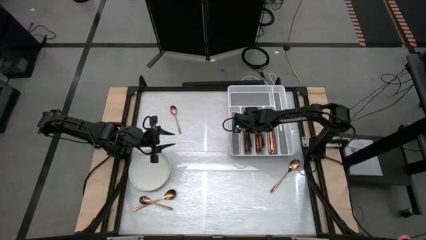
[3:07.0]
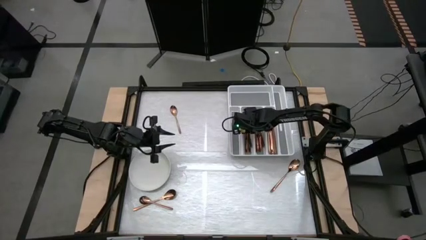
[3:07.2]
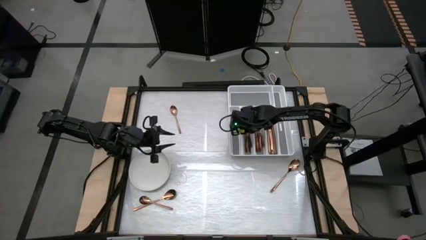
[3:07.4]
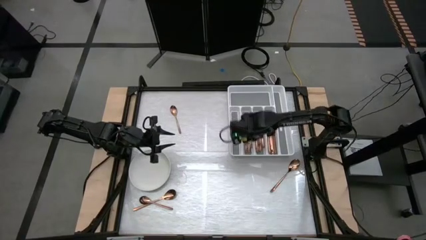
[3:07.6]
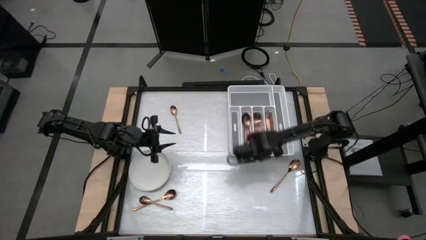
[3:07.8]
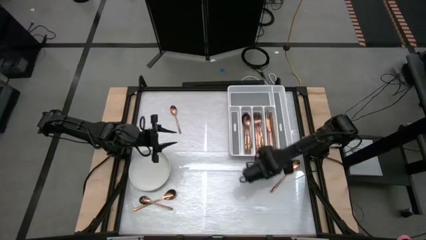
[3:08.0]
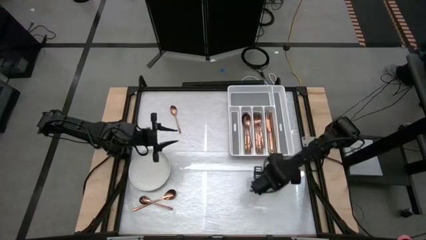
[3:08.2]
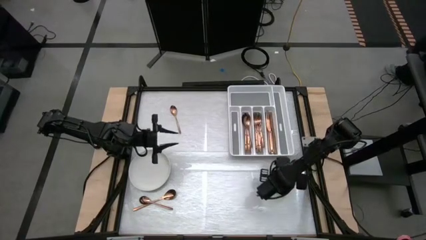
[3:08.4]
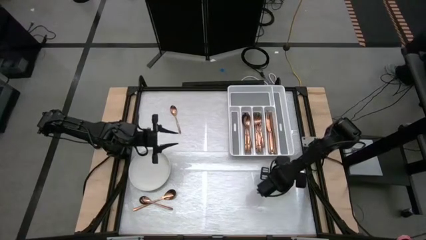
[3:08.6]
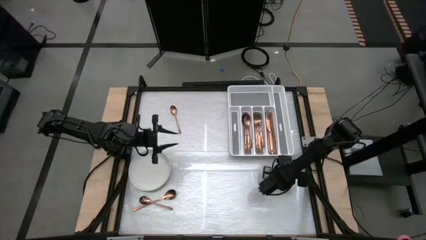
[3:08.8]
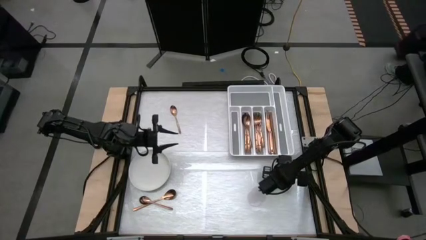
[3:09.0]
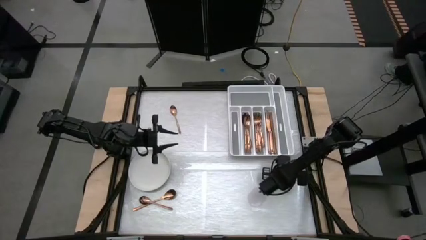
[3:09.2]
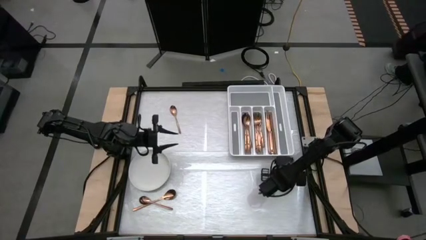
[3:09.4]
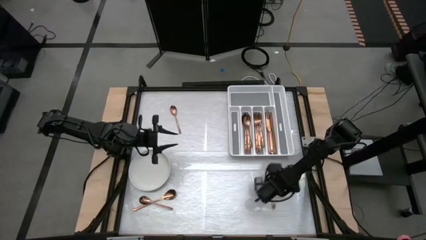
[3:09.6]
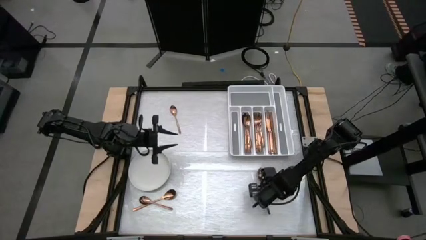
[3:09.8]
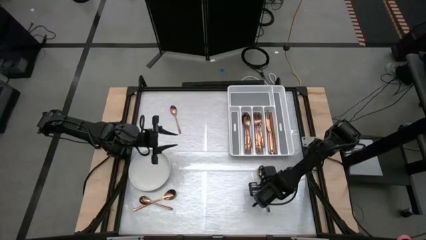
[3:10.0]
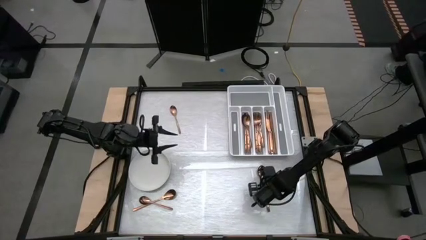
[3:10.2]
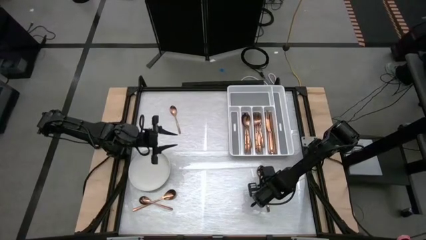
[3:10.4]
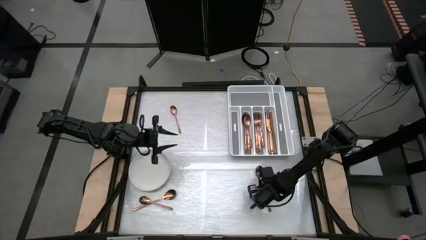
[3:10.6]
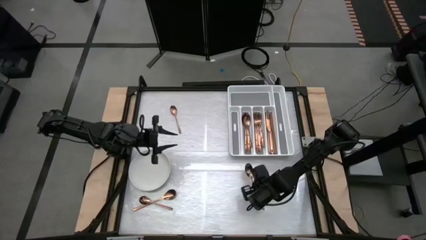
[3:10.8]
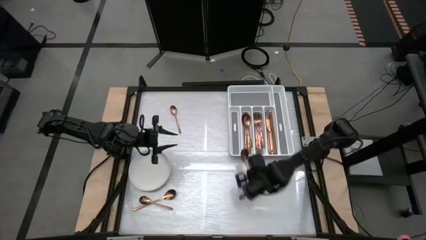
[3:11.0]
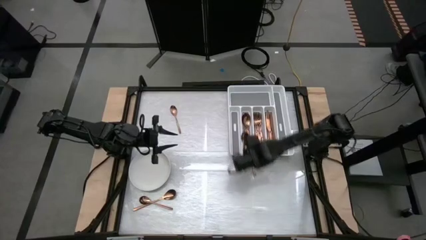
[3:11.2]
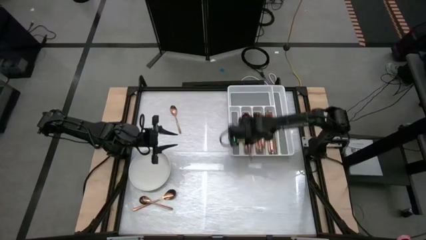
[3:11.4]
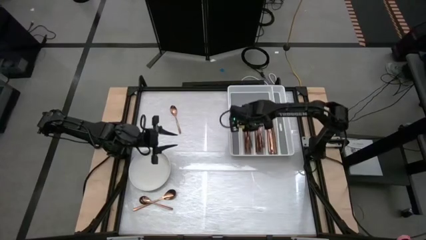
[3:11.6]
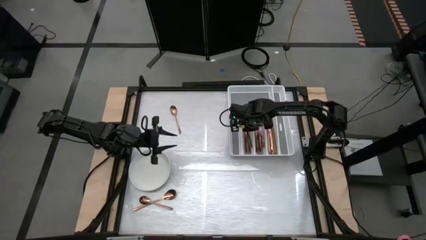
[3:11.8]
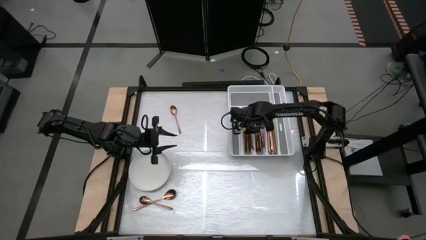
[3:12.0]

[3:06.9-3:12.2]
Task: Sort silverware
Put the bronze spoon into the silverware tray

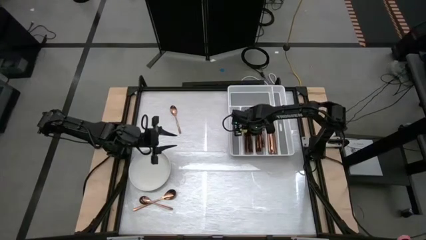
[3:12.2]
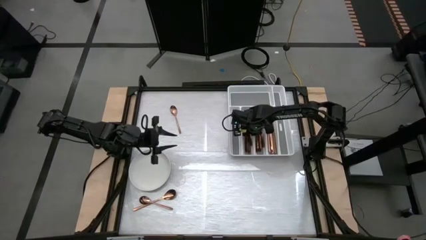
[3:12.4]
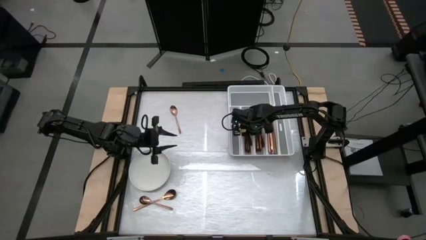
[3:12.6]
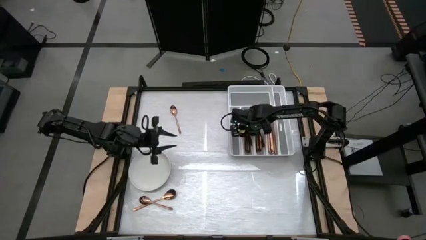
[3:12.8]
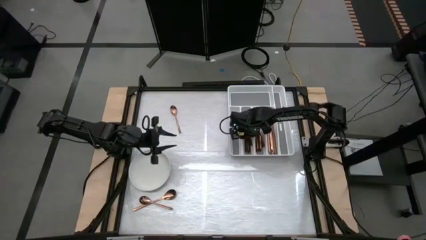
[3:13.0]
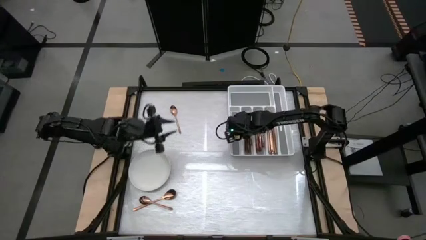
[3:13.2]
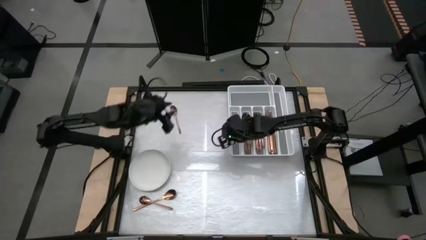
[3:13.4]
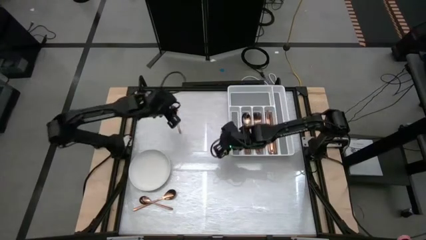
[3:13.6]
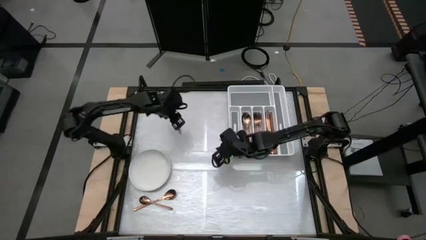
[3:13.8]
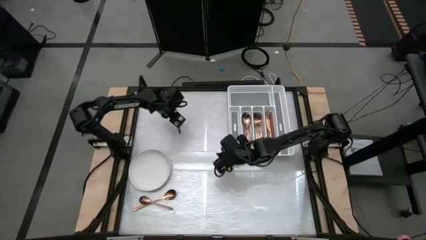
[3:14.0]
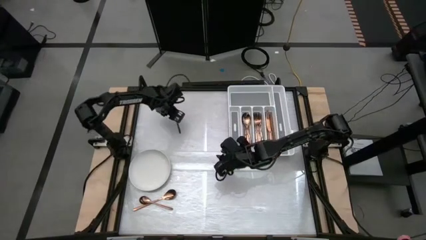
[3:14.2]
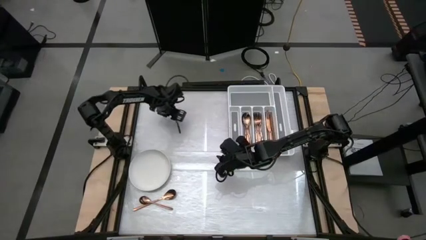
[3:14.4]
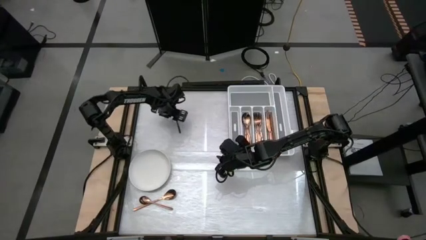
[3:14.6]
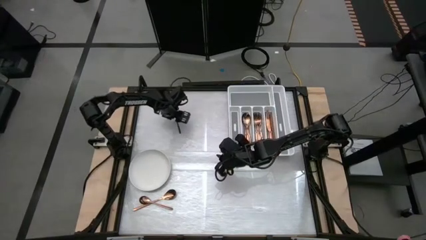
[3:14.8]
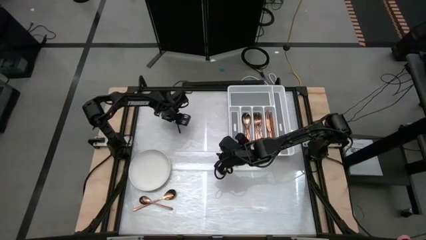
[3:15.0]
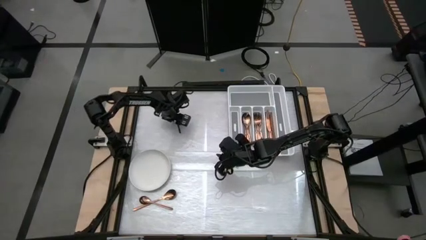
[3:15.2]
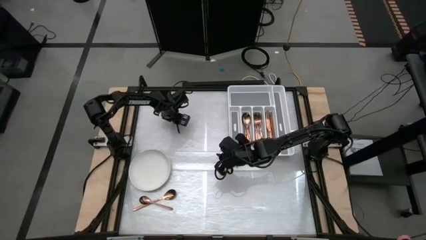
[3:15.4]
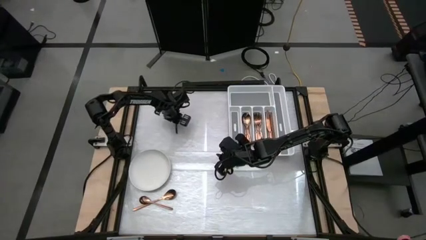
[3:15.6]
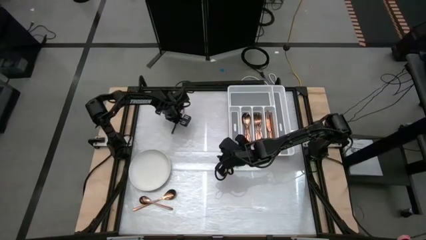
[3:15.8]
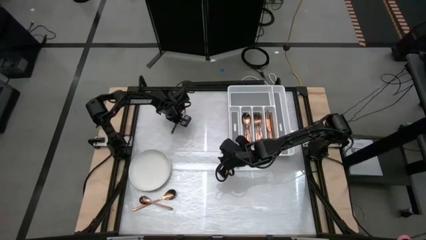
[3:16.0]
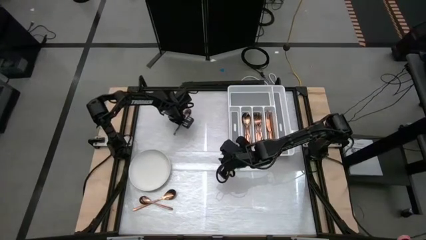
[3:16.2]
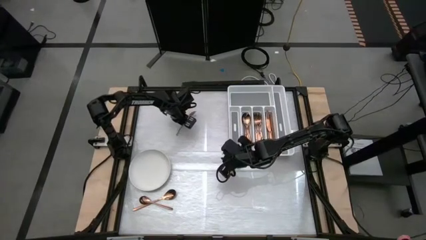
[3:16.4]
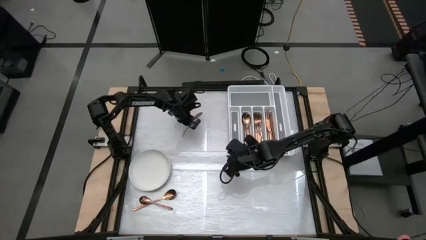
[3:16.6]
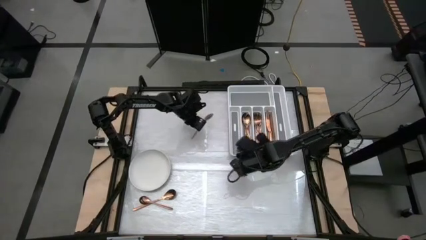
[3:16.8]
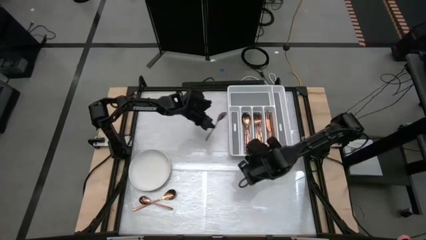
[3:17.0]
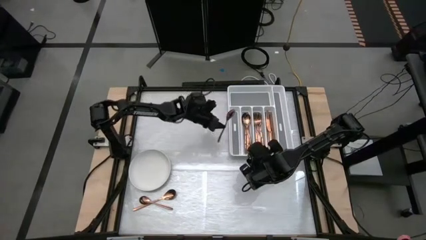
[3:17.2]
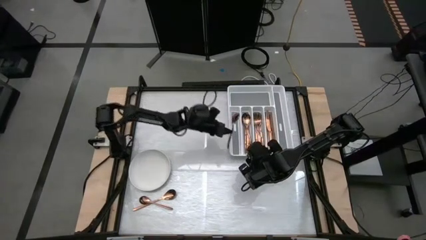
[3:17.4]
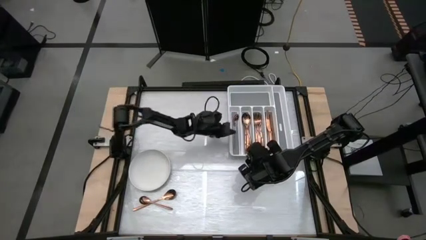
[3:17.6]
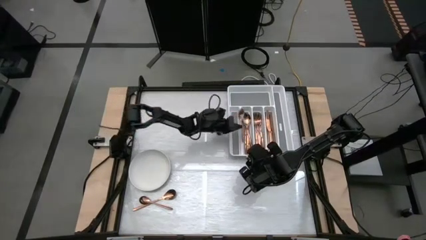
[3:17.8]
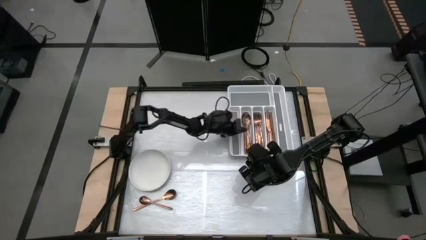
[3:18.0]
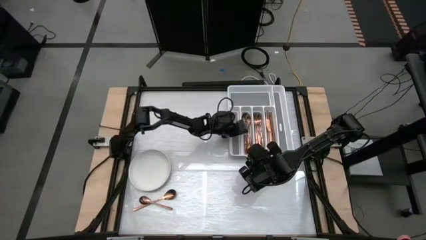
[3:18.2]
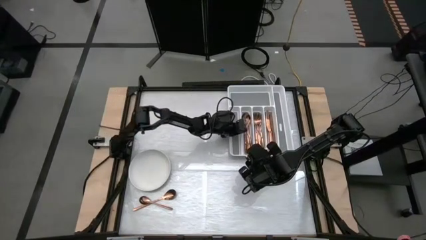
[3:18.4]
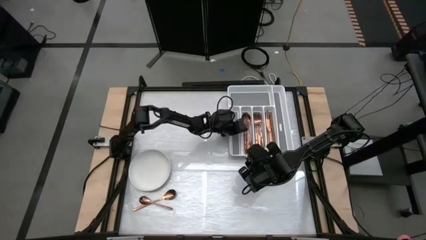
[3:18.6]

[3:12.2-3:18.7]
Put the bronze spoon into the silverware tray
